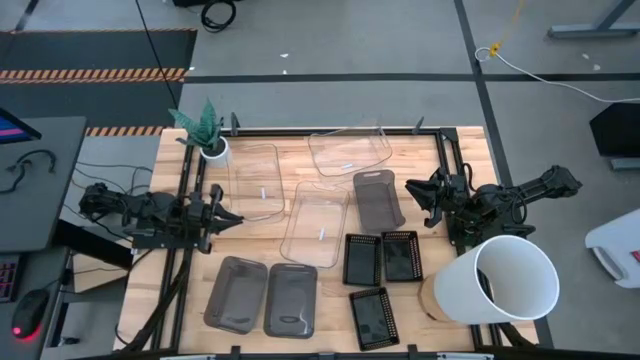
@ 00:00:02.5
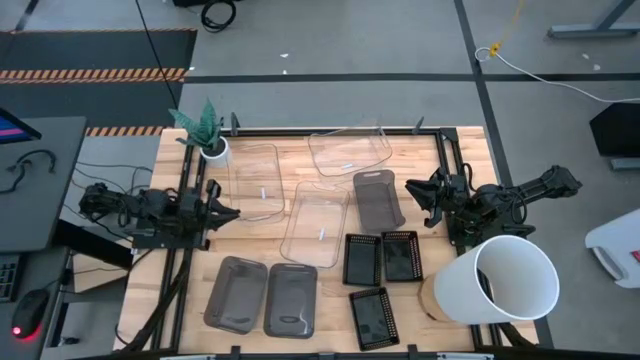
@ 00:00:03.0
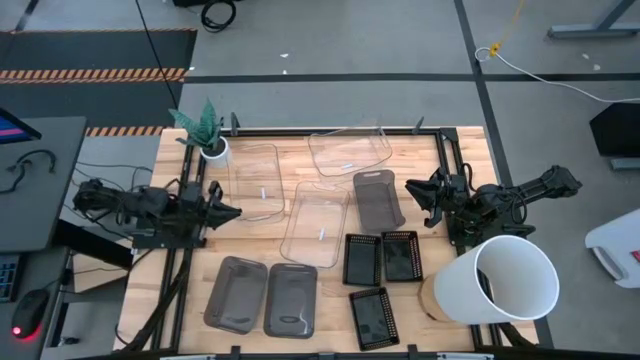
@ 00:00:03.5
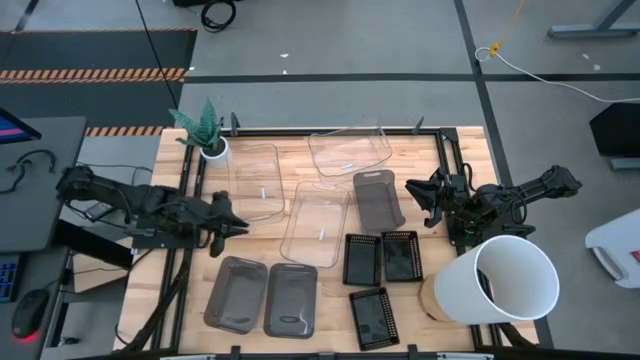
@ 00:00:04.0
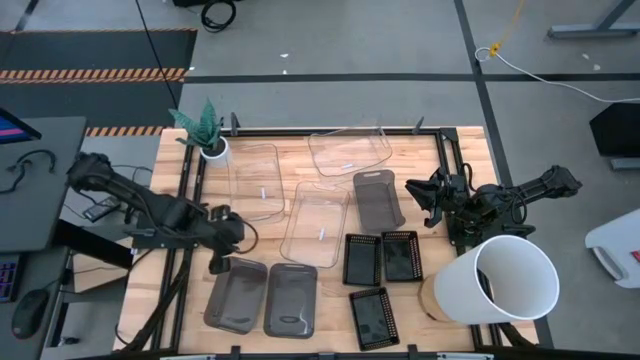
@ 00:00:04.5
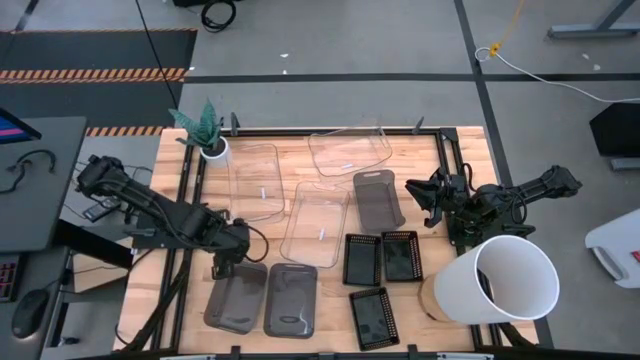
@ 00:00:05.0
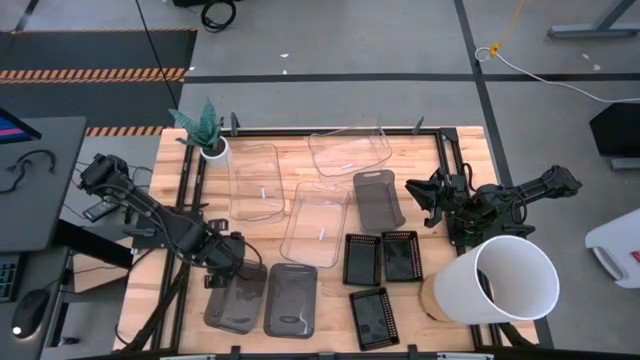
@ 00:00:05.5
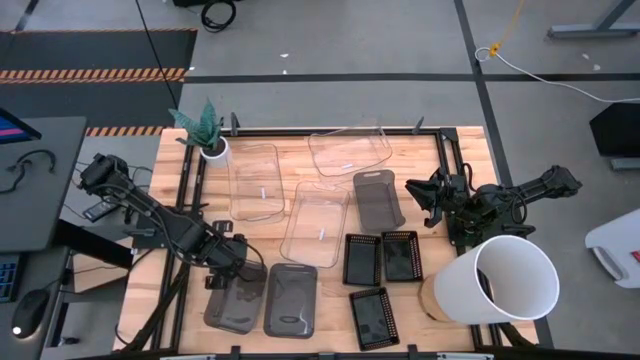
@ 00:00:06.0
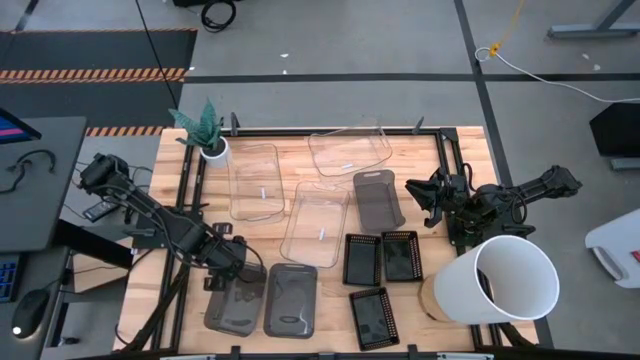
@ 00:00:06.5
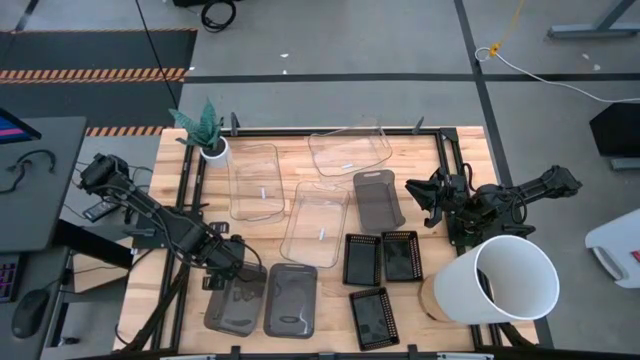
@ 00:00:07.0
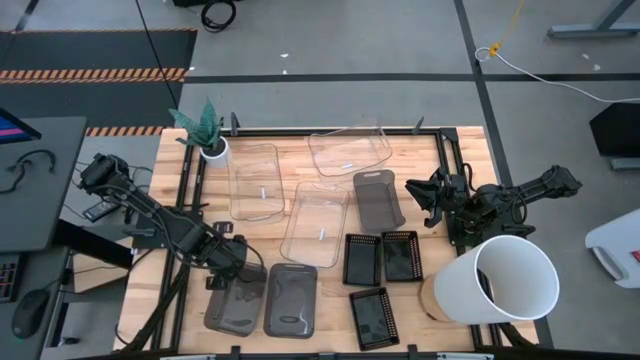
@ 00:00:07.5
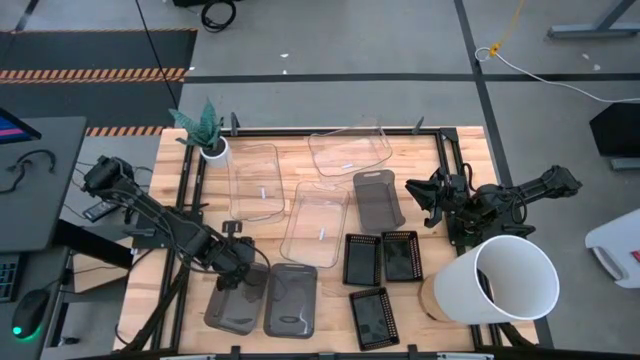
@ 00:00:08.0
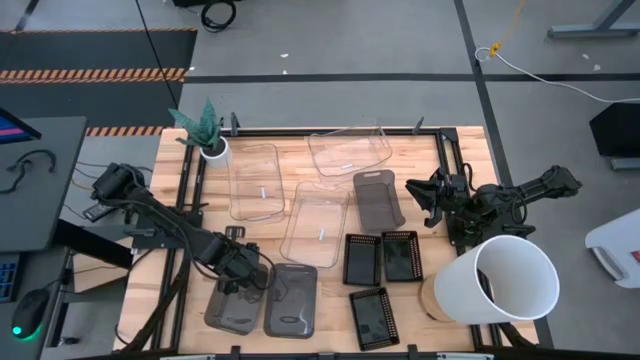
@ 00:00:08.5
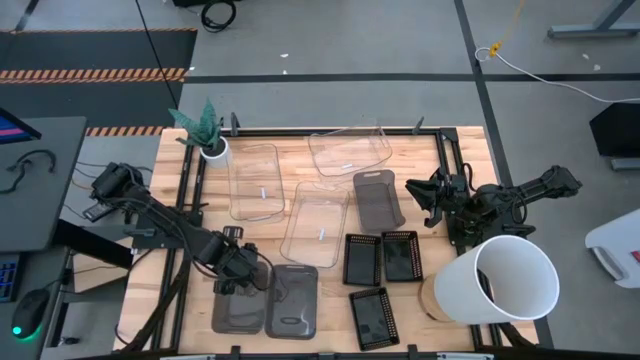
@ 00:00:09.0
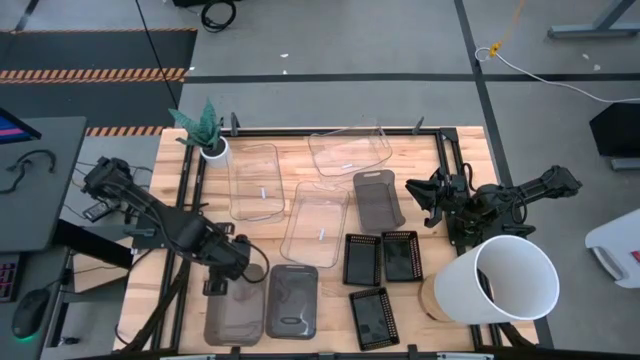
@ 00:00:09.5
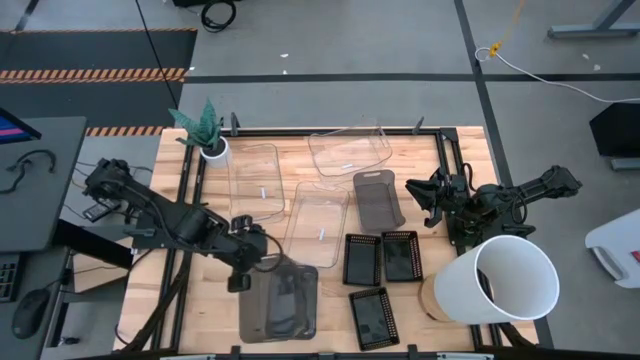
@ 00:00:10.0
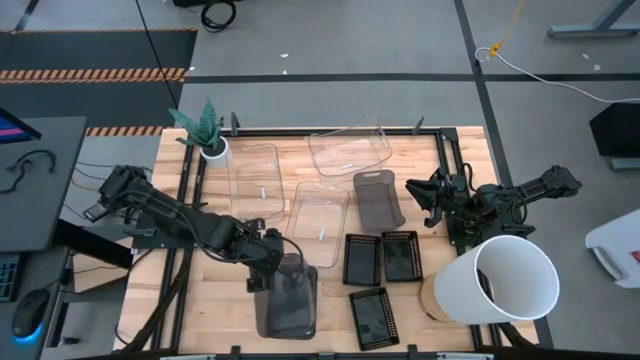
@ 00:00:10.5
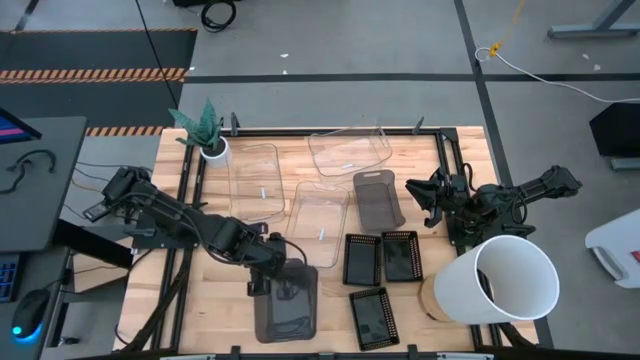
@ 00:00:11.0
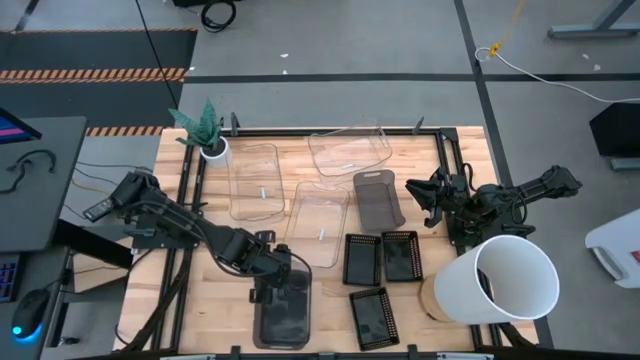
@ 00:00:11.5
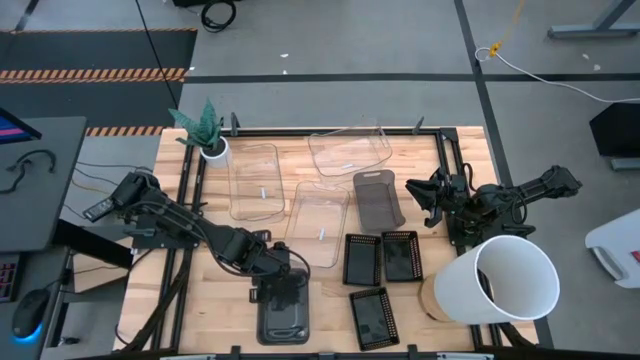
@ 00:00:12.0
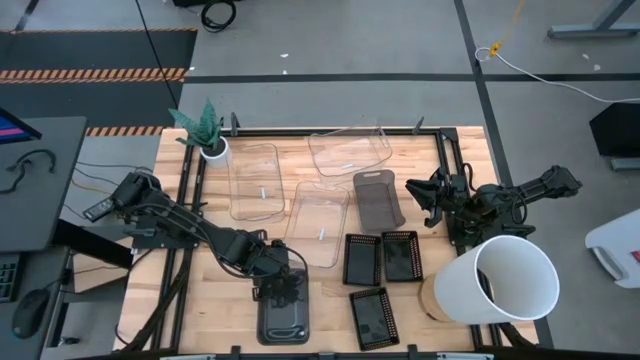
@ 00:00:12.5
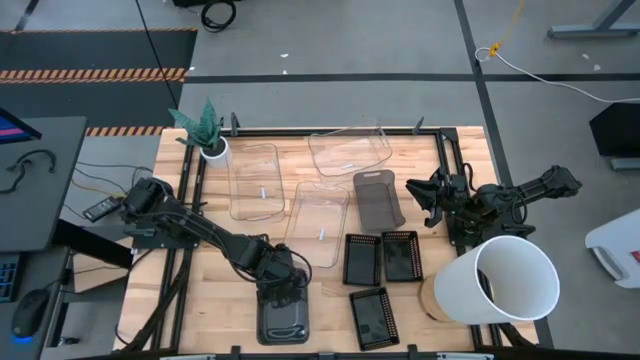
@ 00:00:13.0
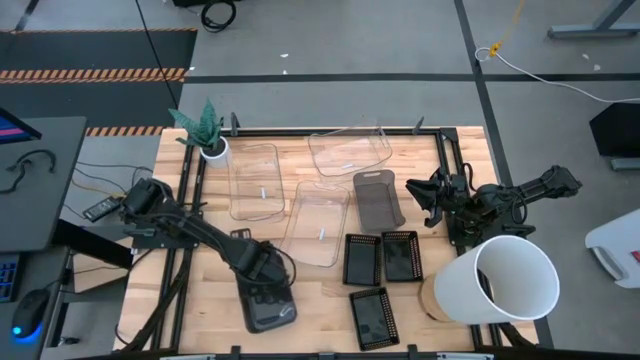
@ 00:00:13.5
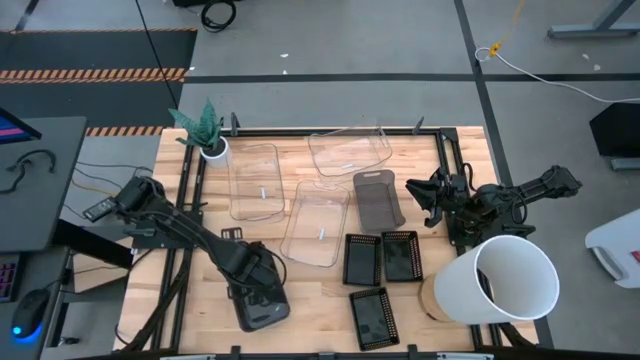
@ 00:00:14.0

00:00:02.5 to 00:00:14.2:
Stack the left black bin on the right black bin

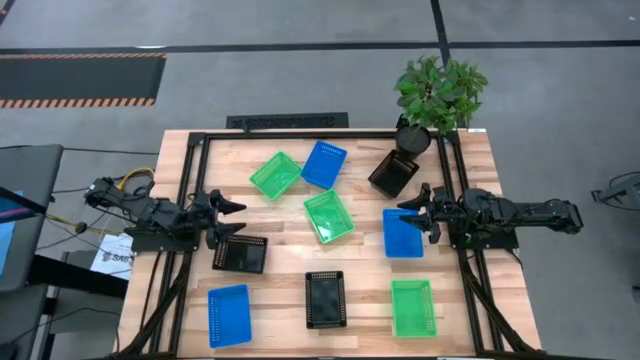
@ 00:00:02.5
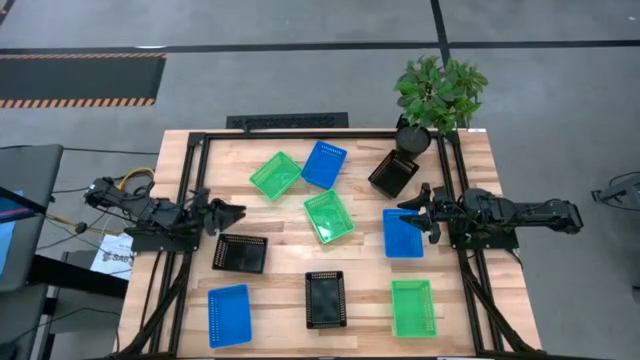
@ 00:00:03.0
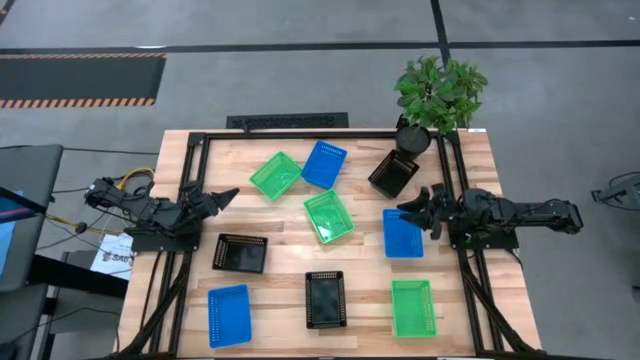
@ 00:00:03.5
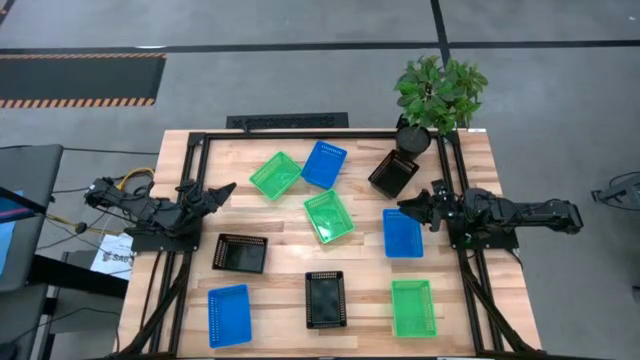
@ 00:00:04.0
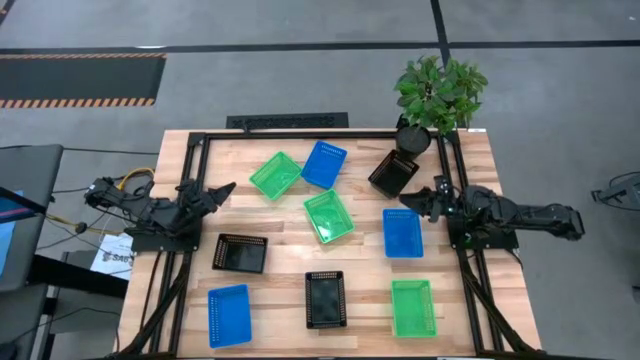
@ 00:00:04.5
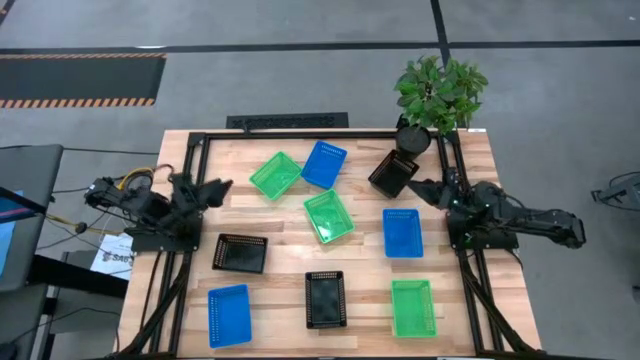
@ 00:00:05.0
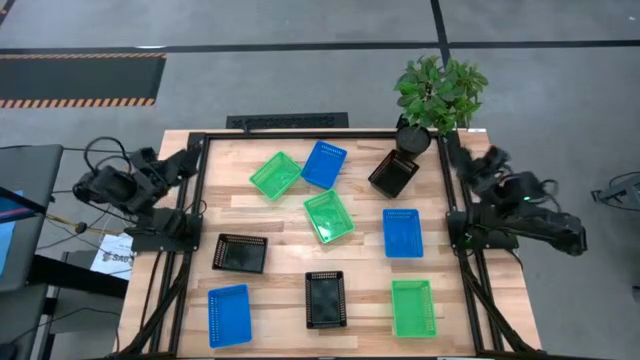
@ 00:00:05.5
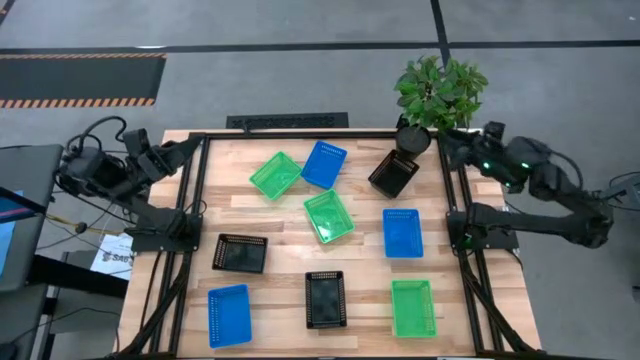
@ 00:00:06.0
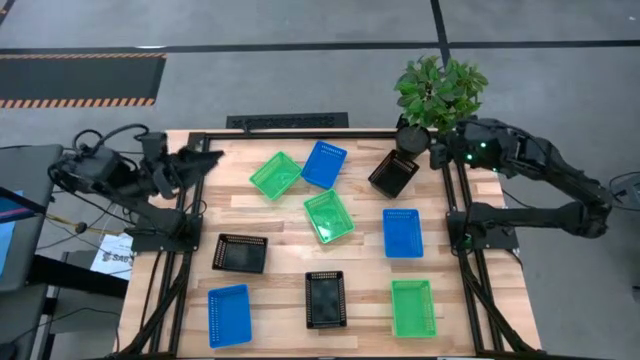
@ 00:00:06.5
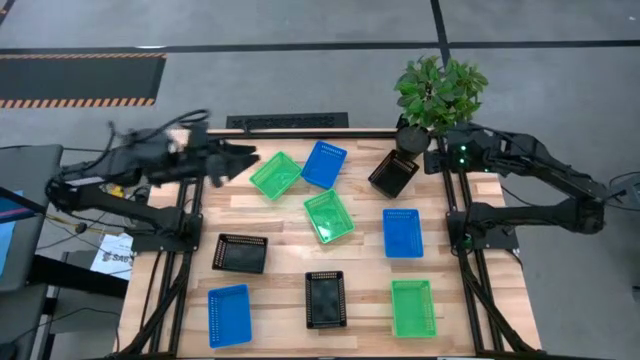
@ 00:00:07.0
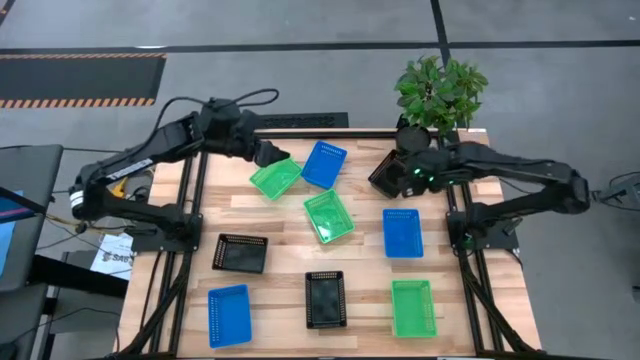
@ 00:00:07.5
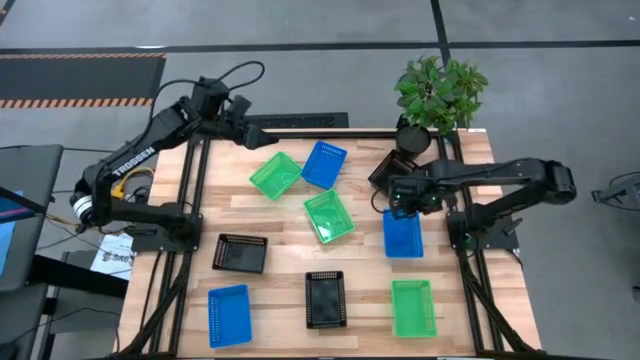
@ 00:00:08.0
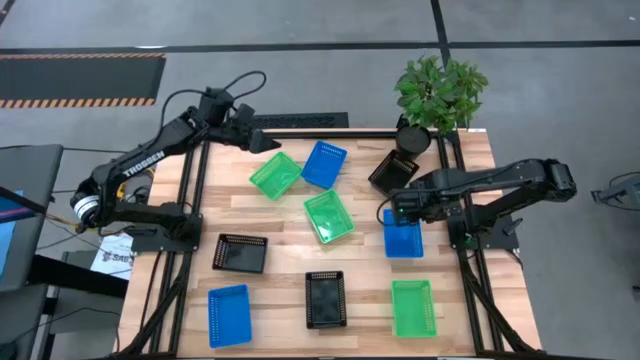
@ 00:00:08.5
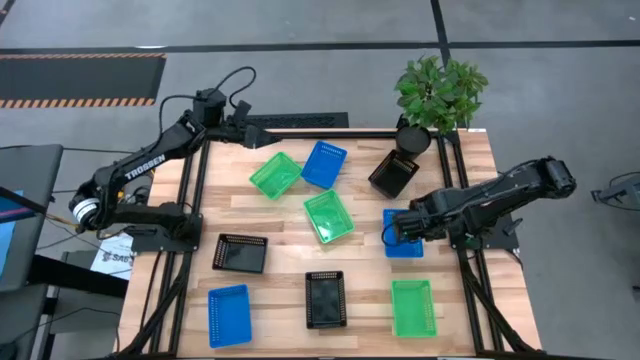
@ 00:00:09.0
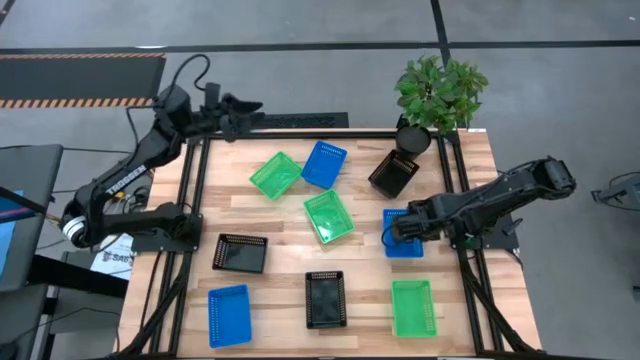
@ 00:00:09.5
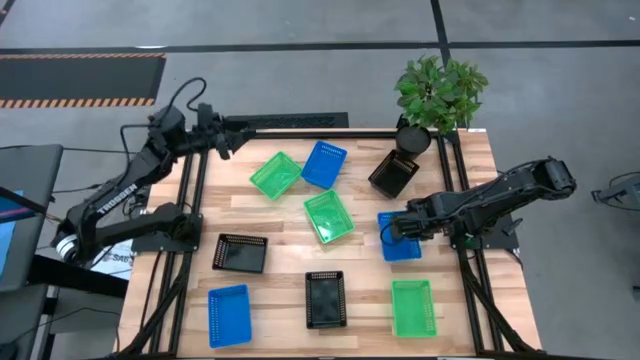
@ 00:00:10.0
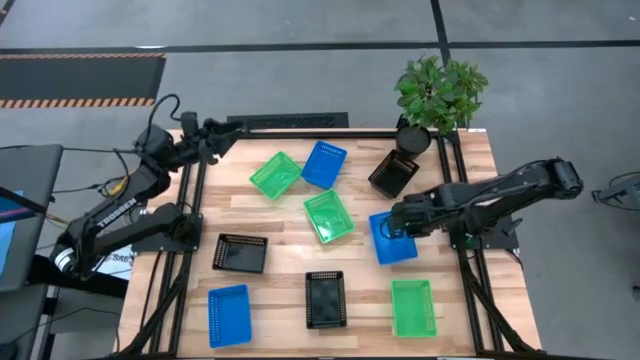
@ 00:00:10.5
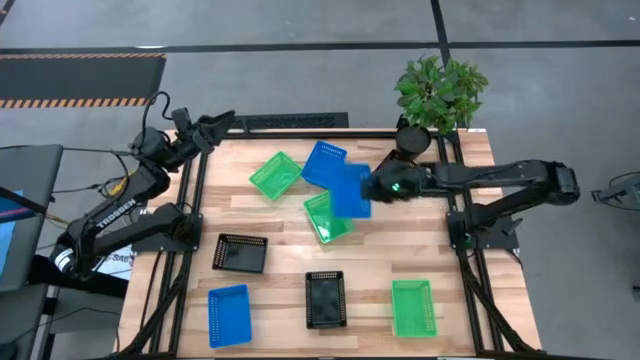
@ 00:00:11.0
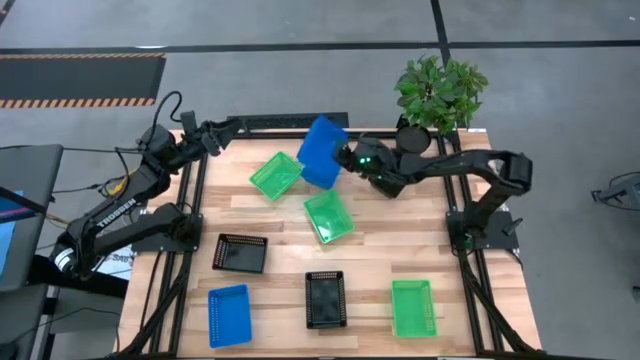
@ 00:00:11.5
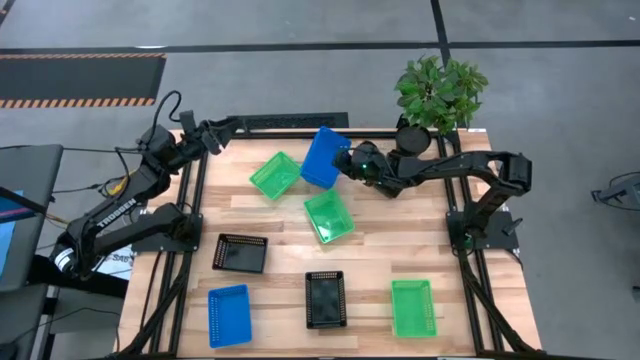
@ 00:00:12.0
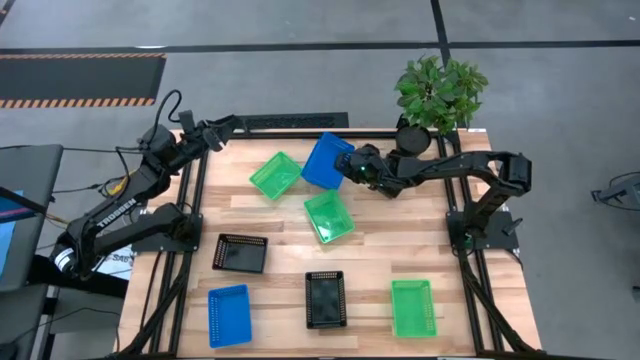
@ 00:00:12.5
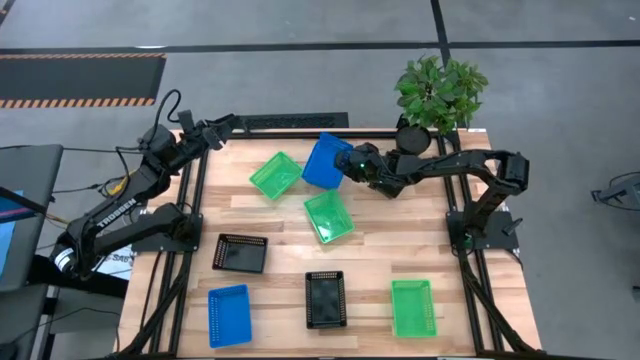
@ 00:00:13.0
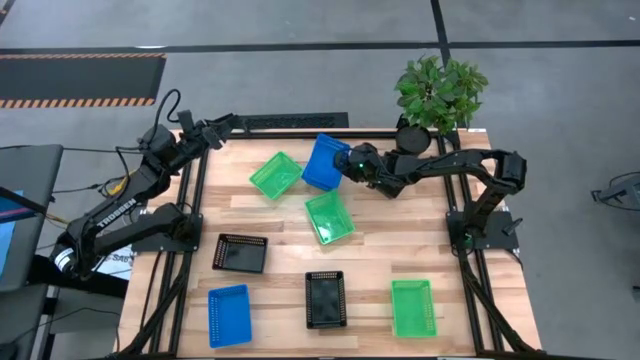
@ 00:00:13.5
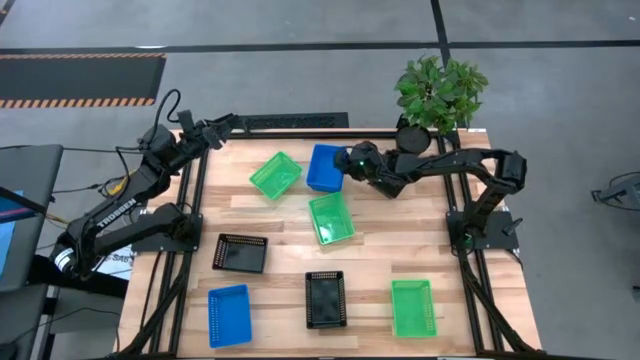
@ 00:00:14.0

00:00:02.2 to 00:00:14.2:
Stack the middle blue bin on the top blue bin
